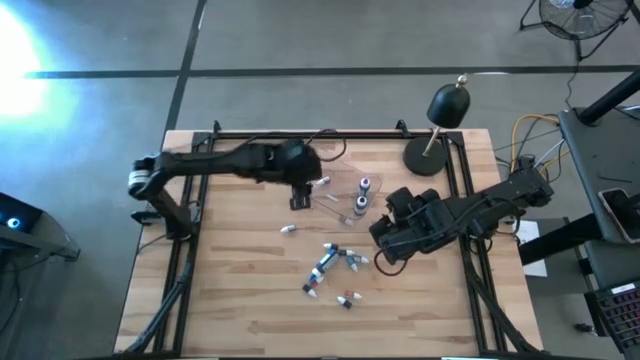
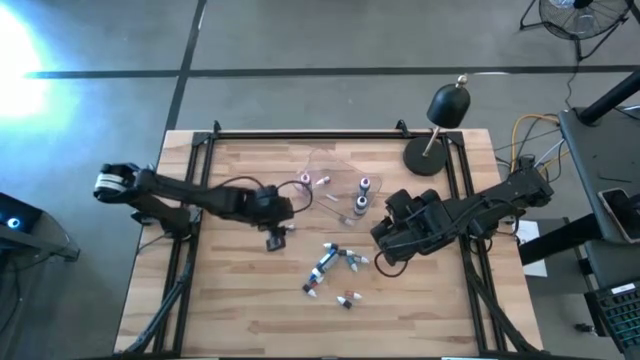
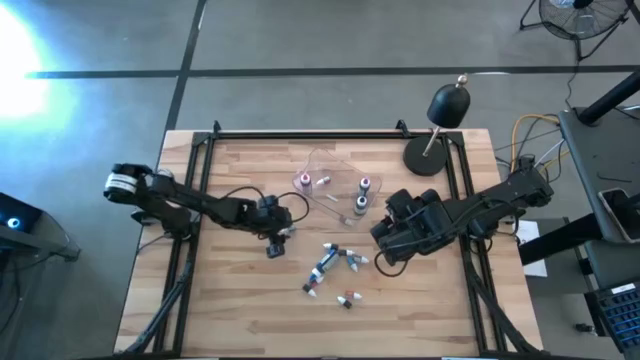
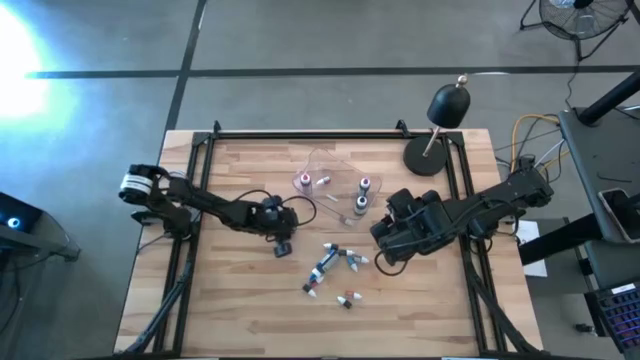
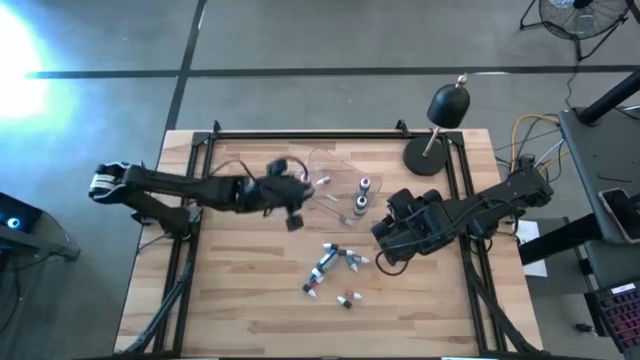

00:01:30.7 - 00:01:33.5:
Task: Pick & Place food coloring
Put the small black food coloring bottle into the transparent bin

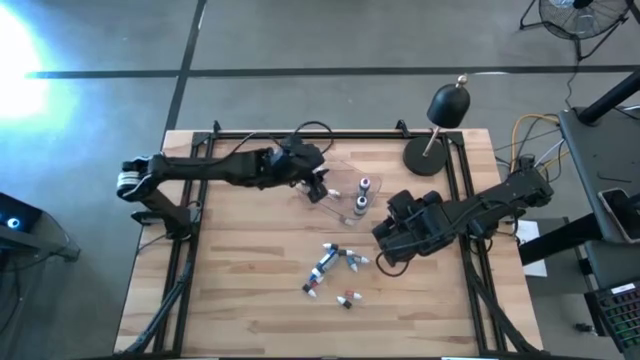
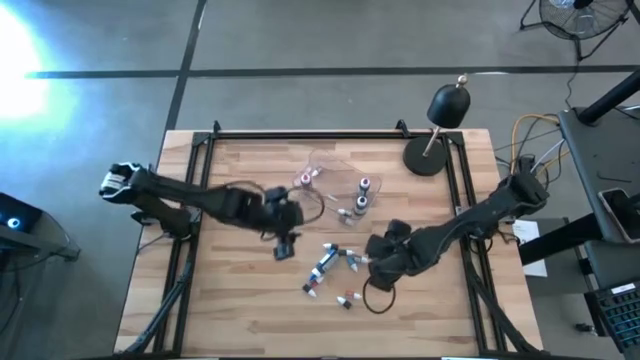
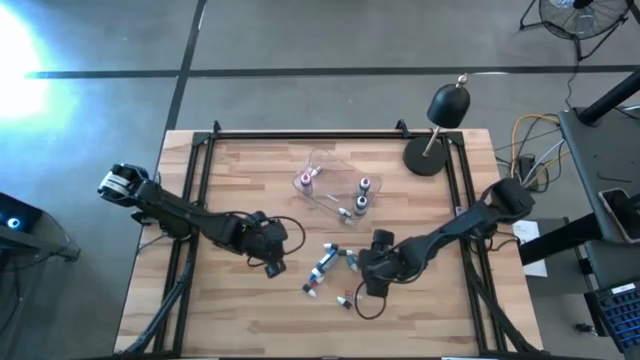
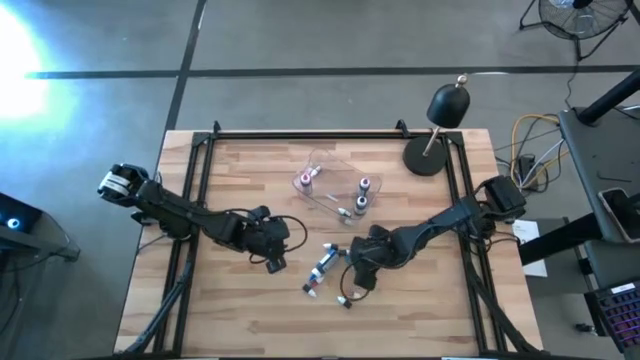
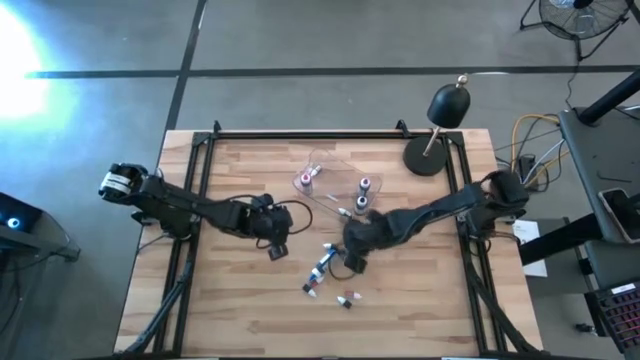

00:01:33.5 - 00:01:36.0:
Put the top small purple food coloring bottle into the transparent bin

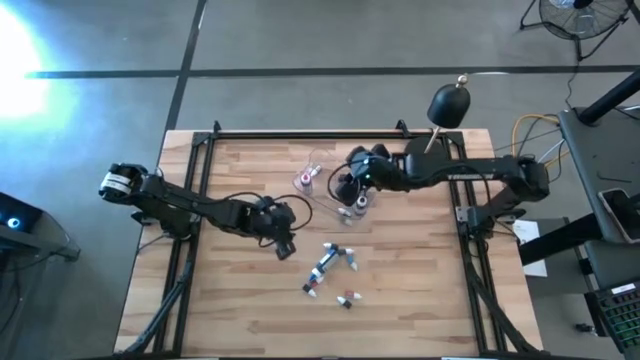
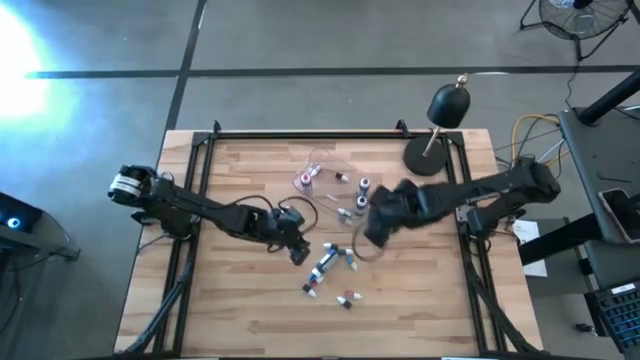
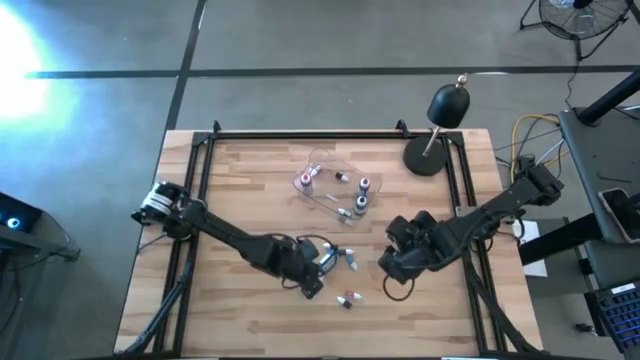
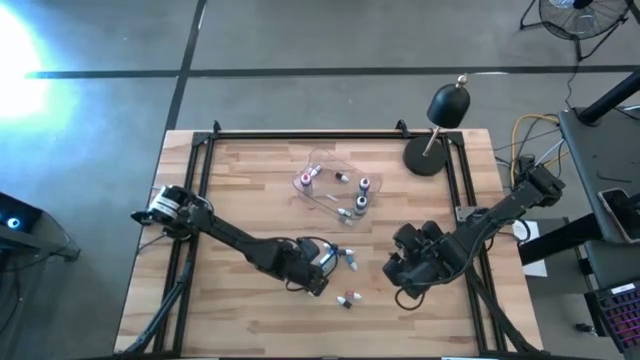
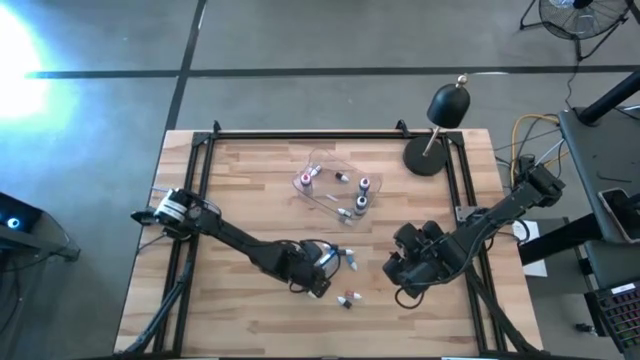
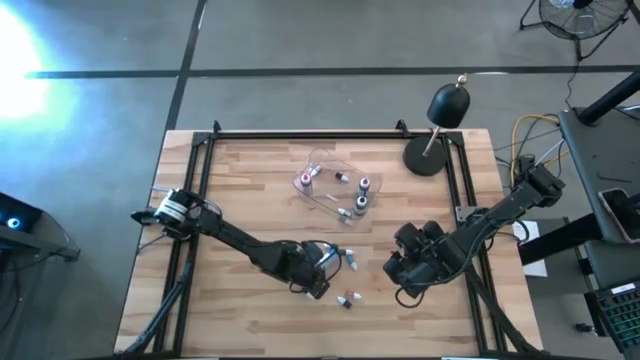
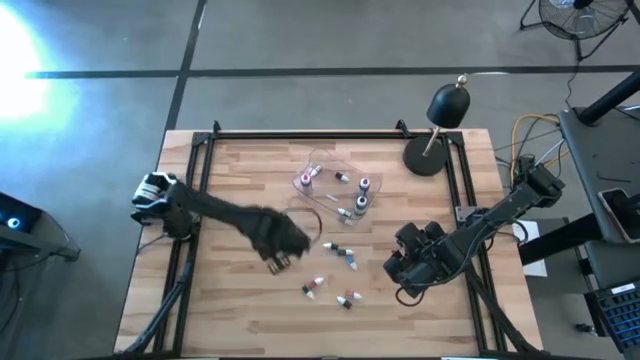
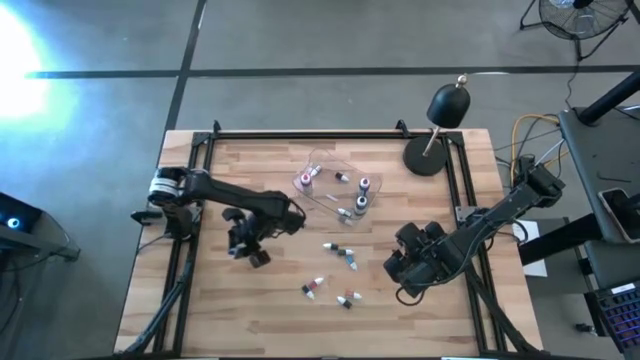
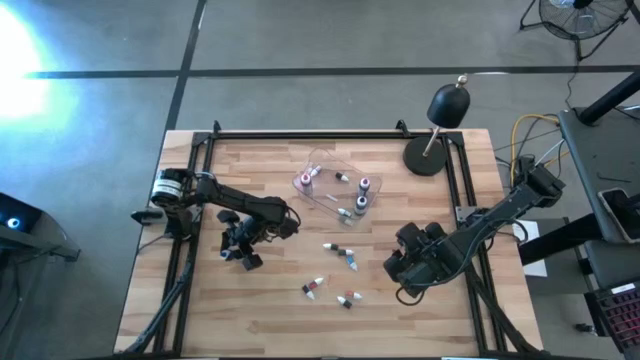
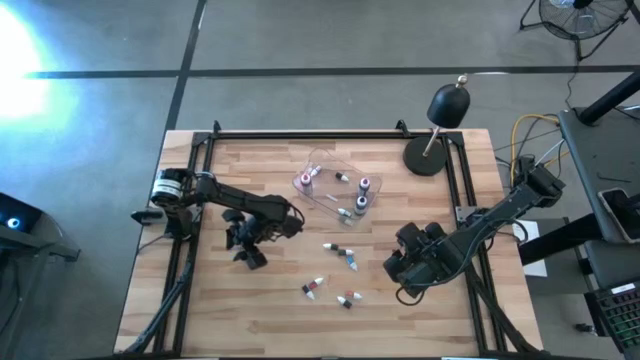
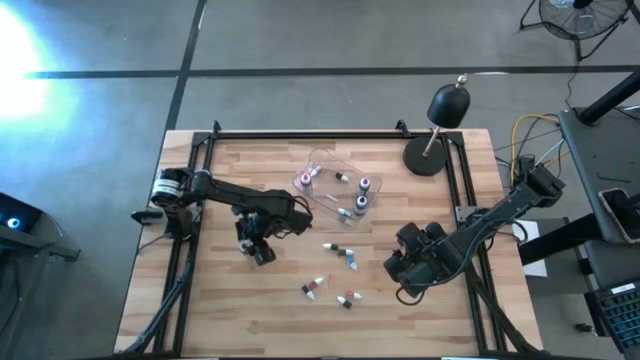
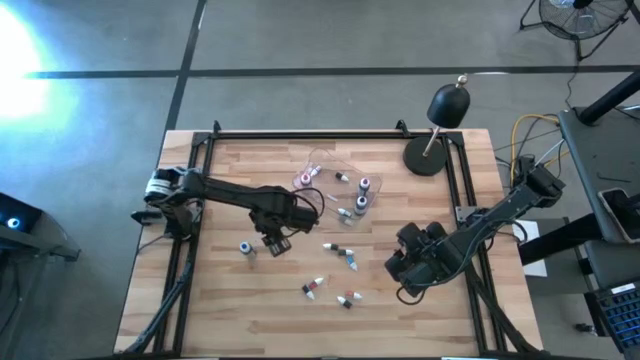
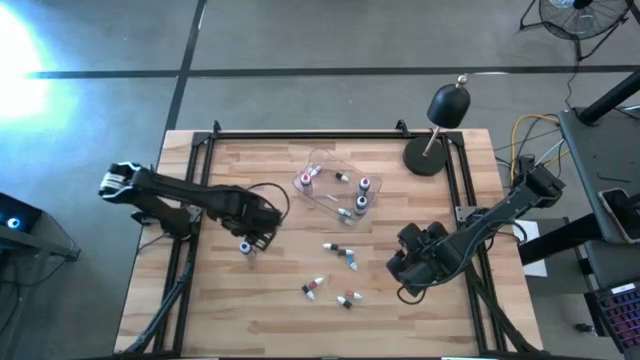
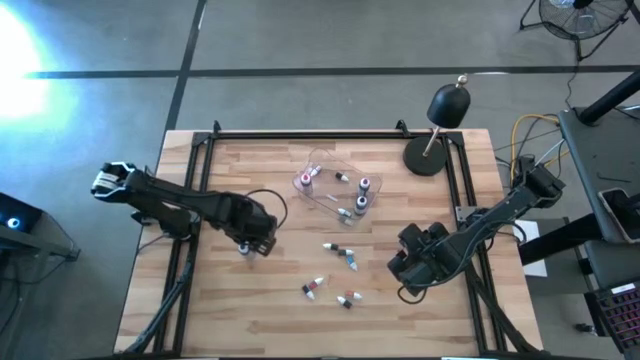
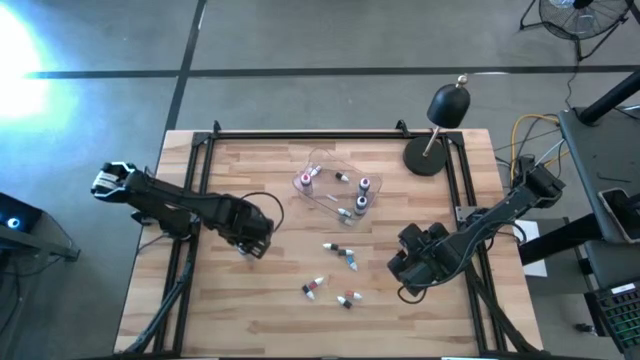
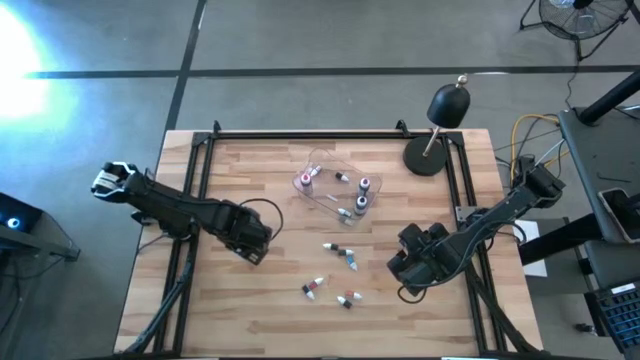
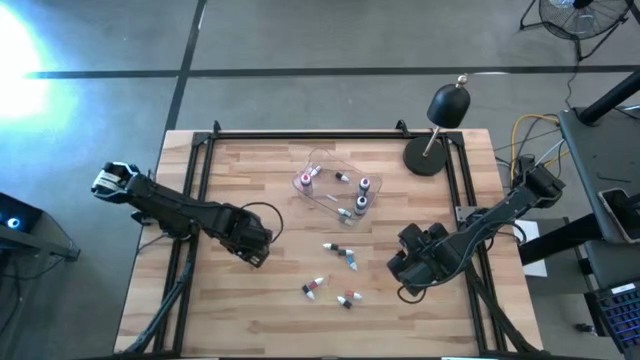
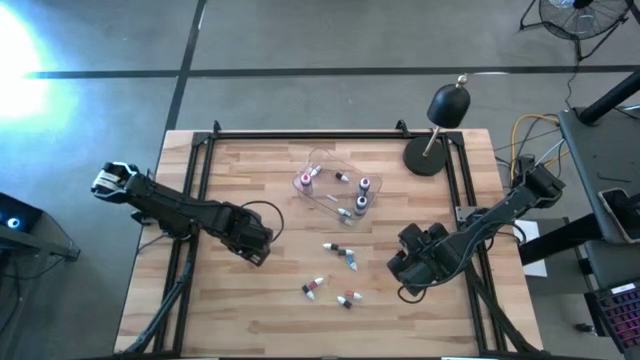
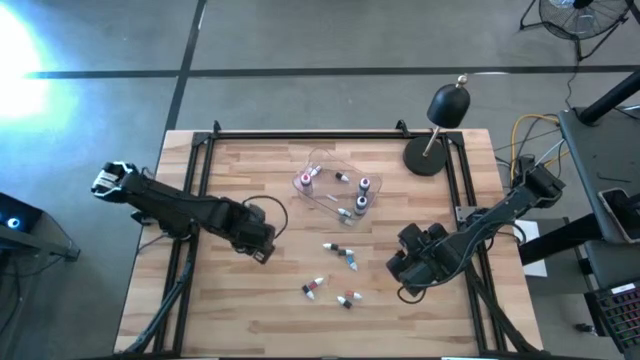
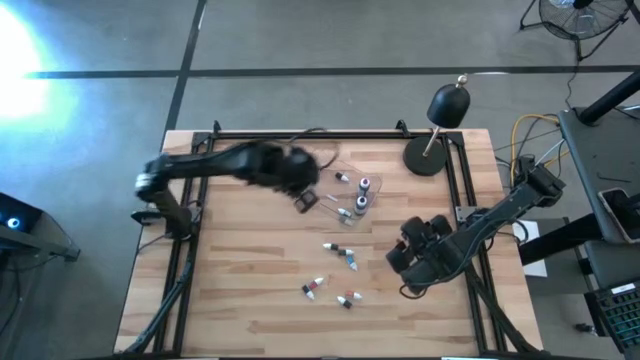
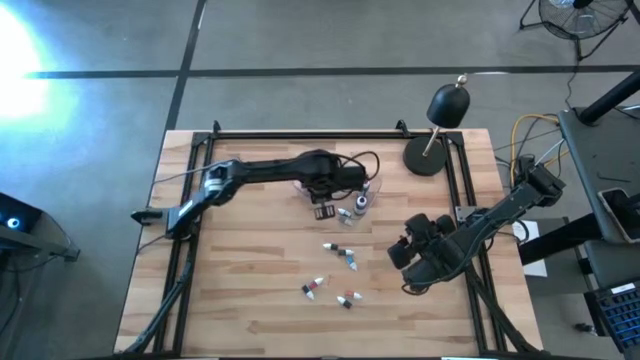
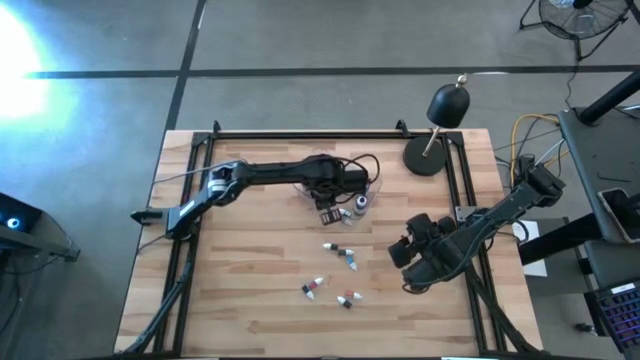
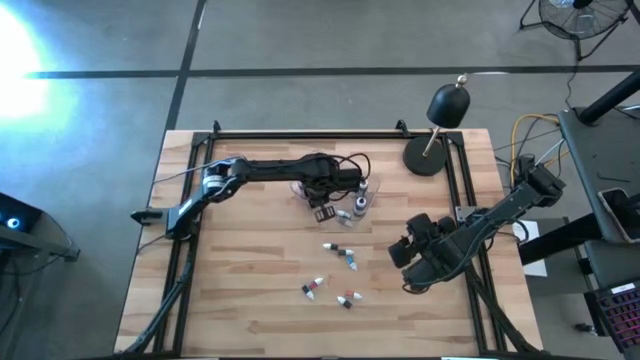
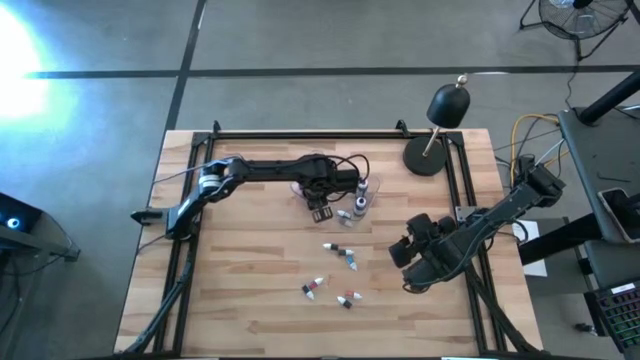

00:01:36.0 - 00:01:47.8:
Put the large blue food coloring bottle into the transparent bin

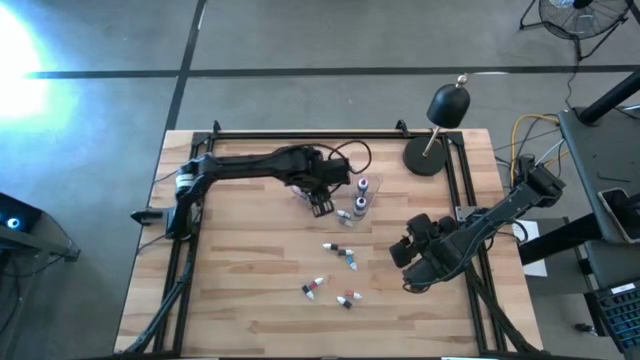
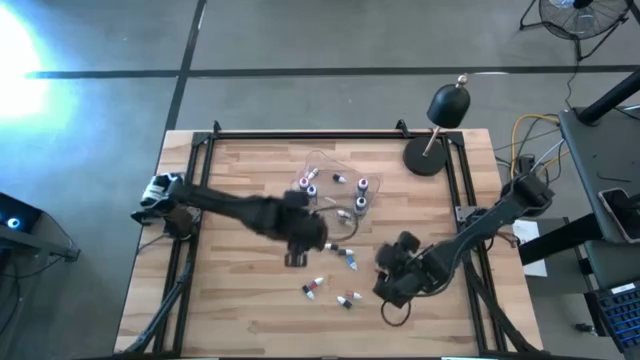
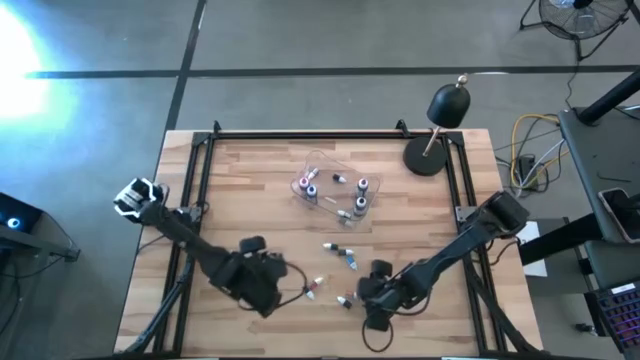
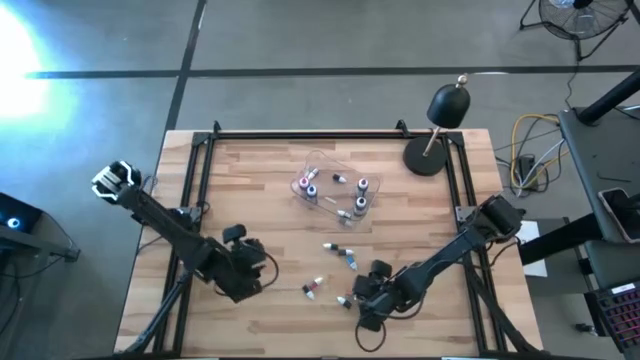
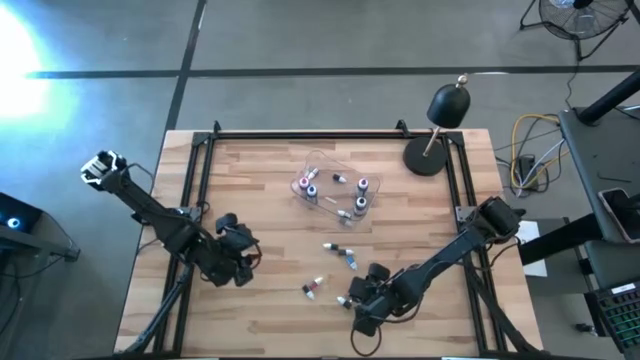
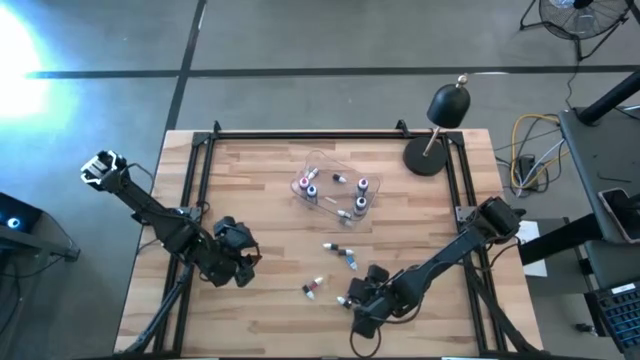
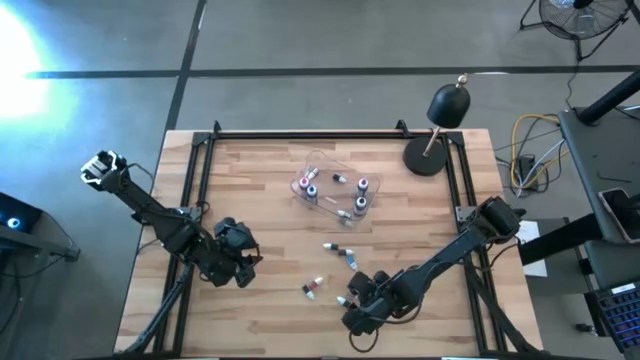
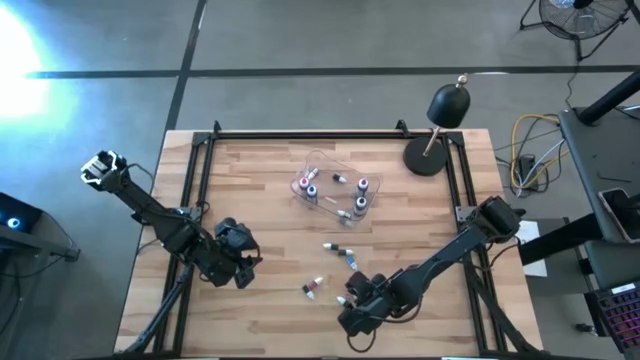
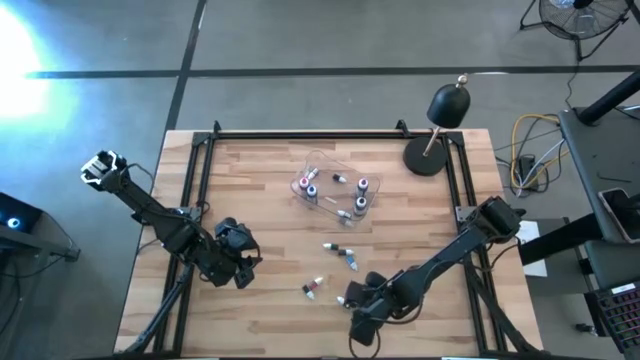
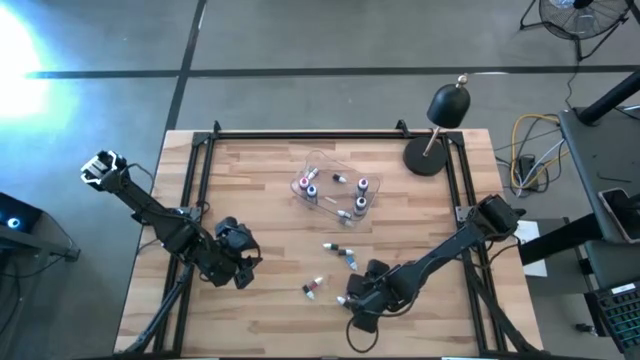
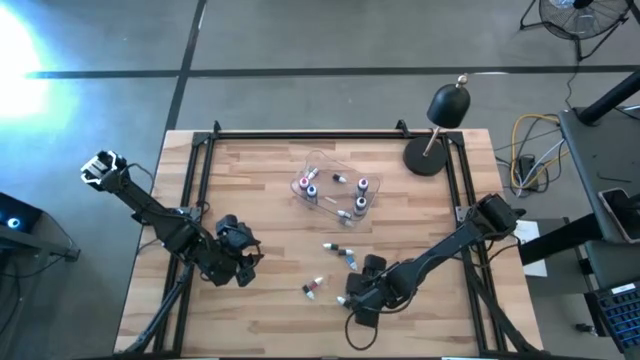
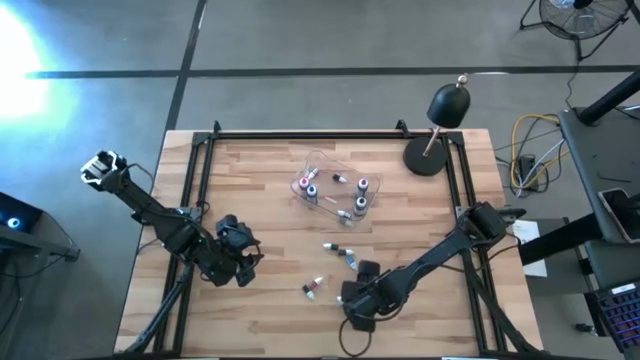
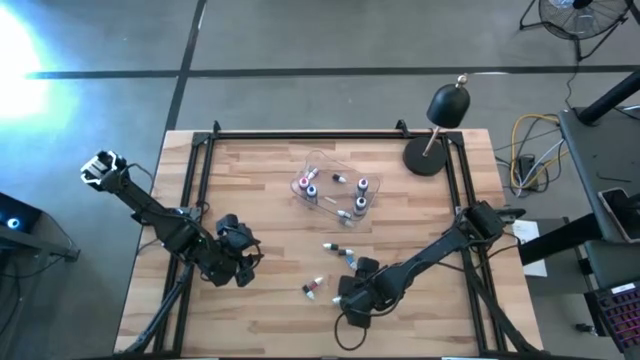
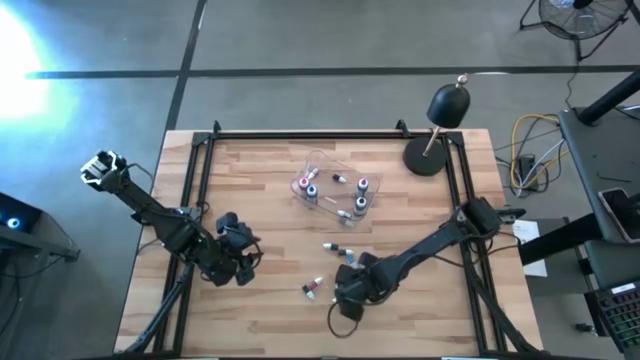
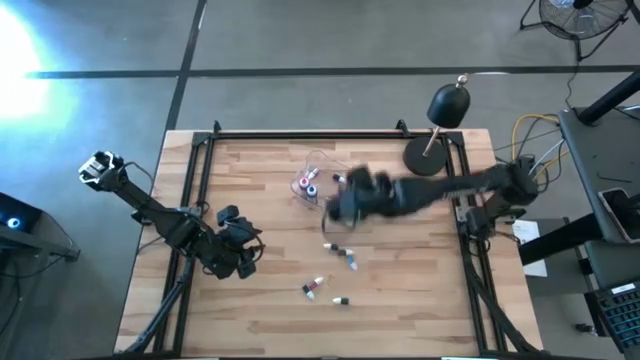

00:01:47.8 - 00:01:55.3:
Put the small orange food coloring bottle into the transparent bin
